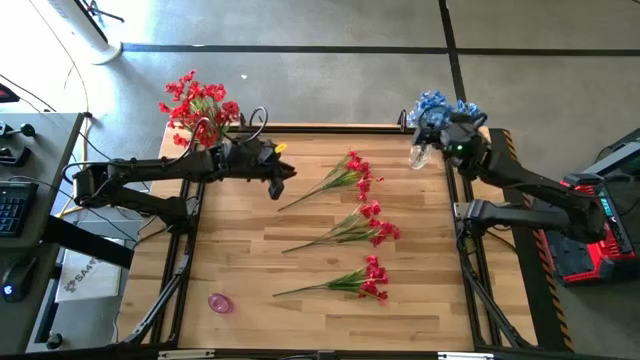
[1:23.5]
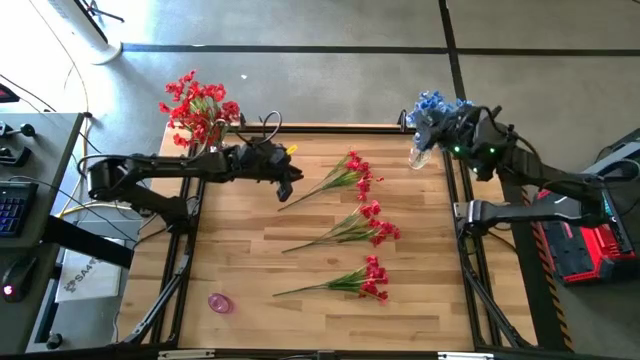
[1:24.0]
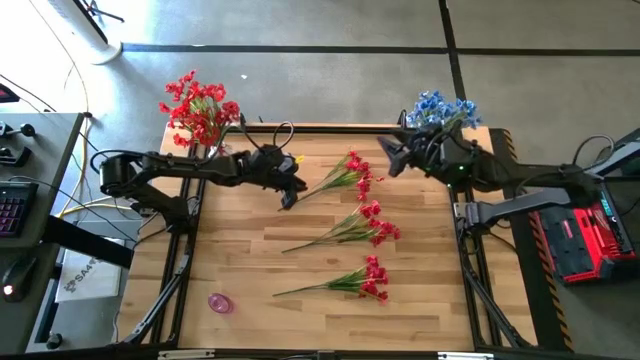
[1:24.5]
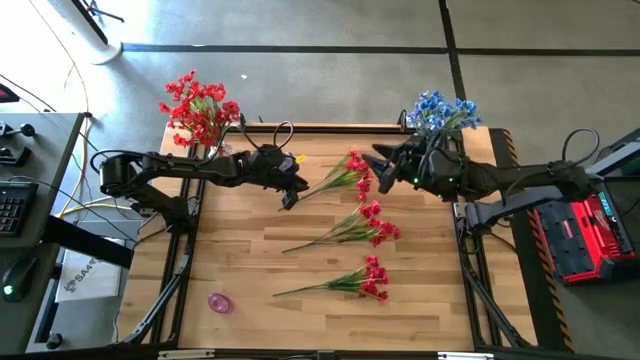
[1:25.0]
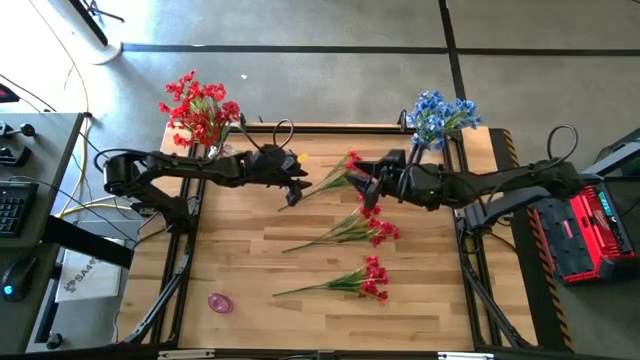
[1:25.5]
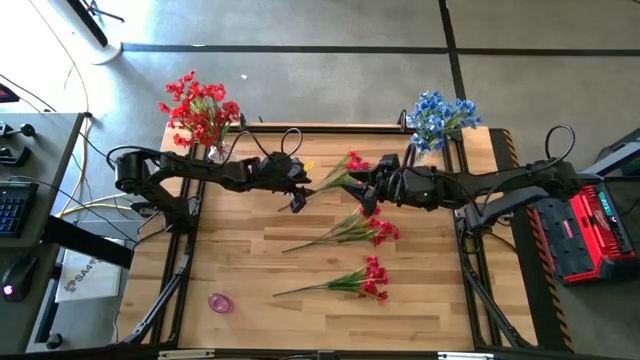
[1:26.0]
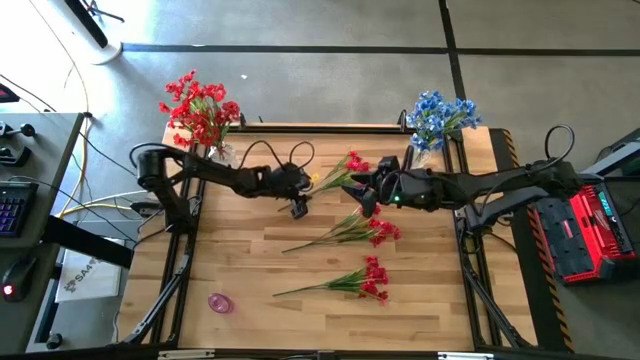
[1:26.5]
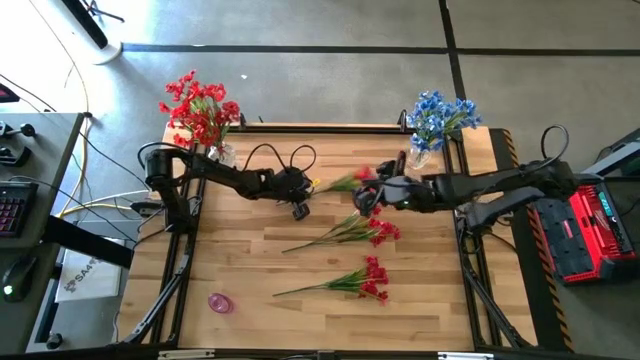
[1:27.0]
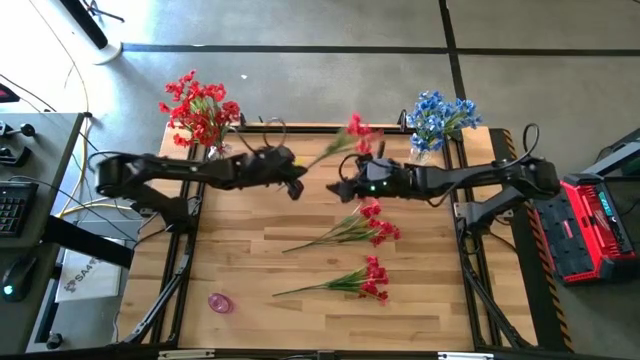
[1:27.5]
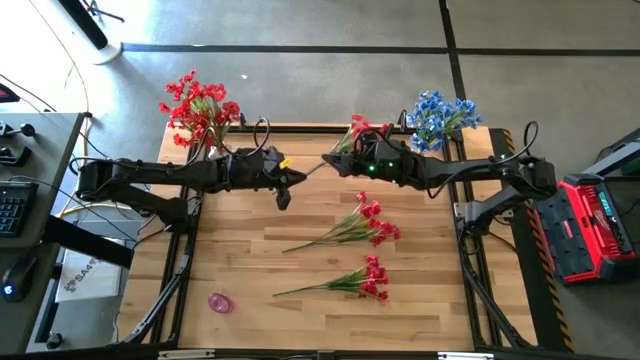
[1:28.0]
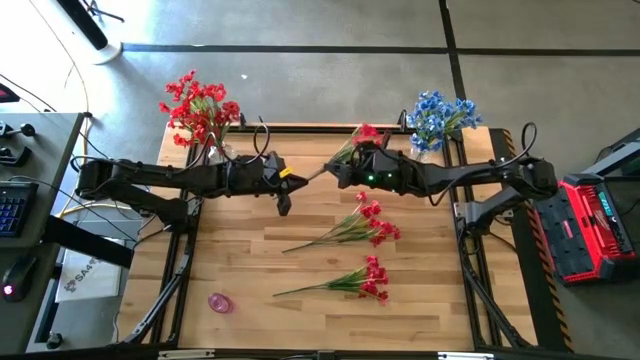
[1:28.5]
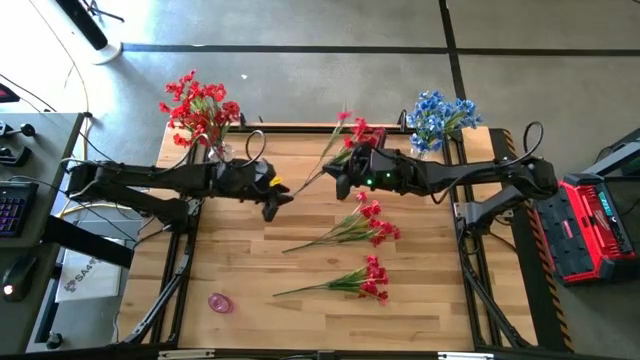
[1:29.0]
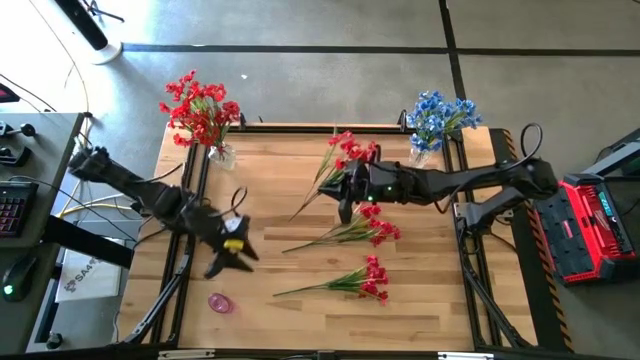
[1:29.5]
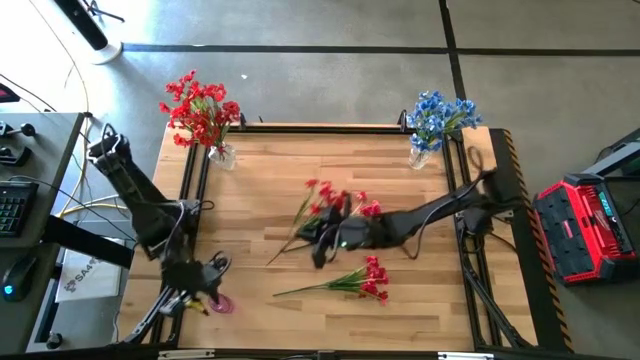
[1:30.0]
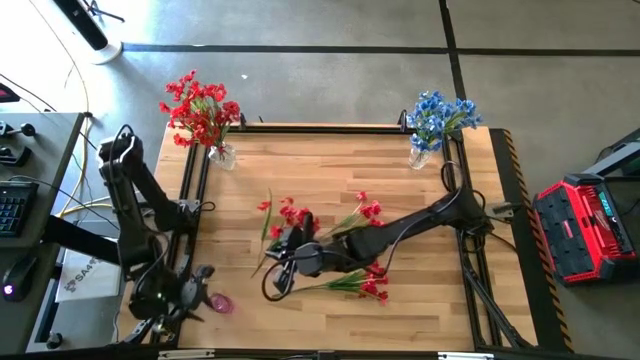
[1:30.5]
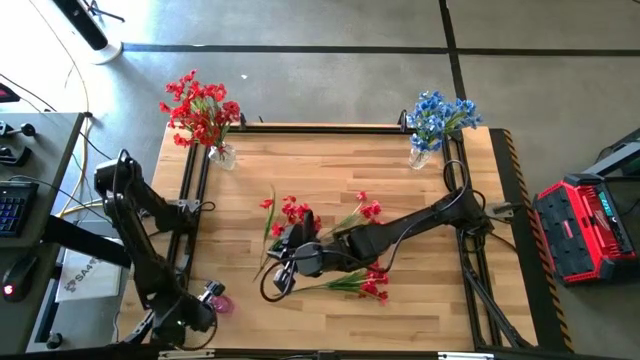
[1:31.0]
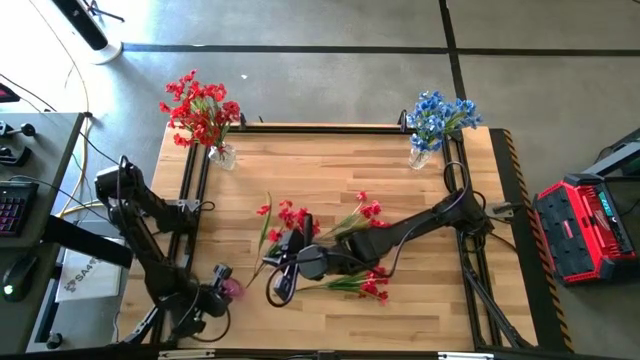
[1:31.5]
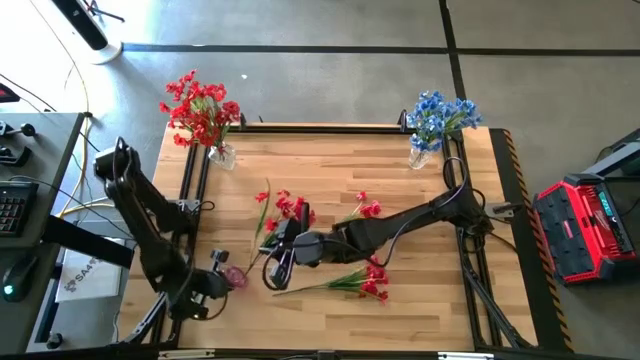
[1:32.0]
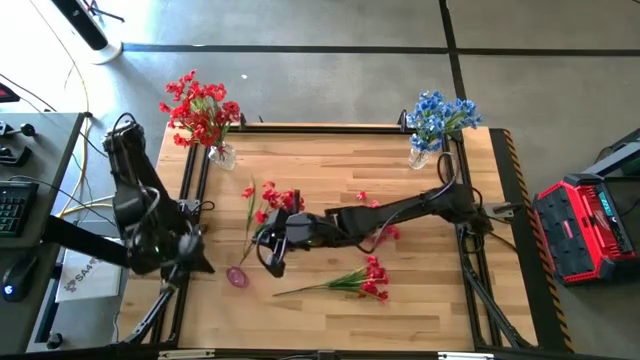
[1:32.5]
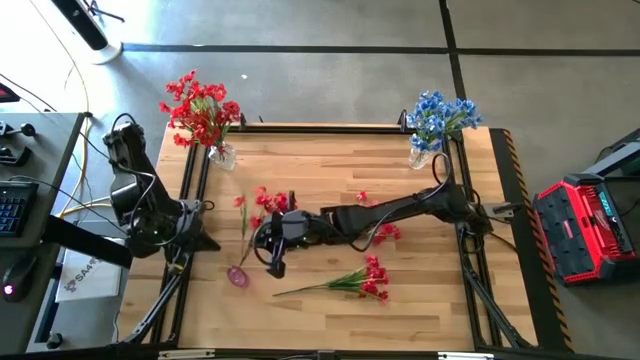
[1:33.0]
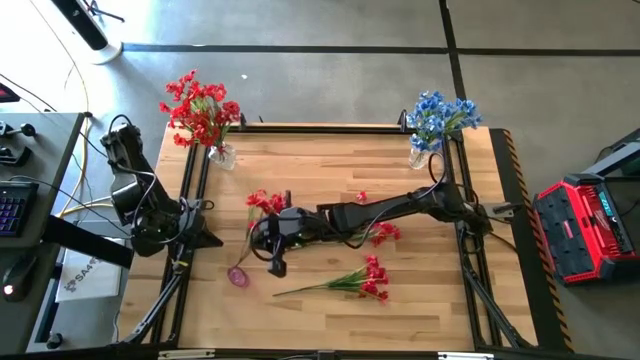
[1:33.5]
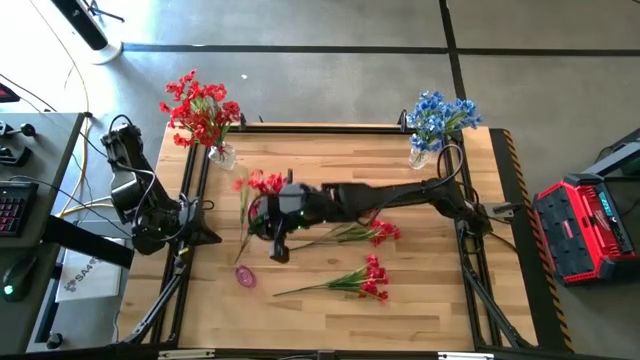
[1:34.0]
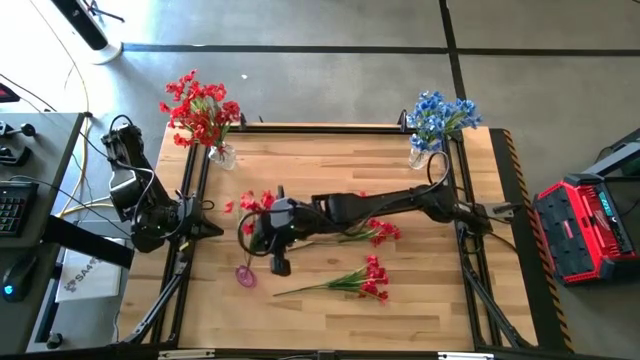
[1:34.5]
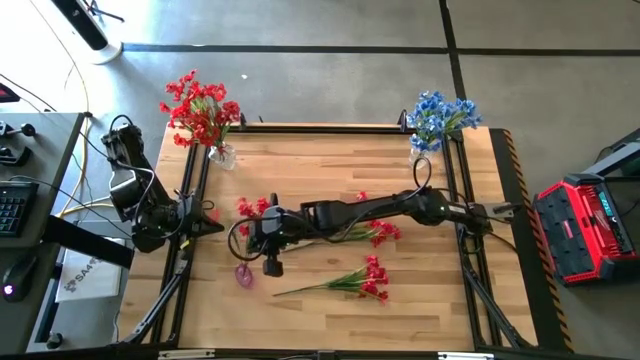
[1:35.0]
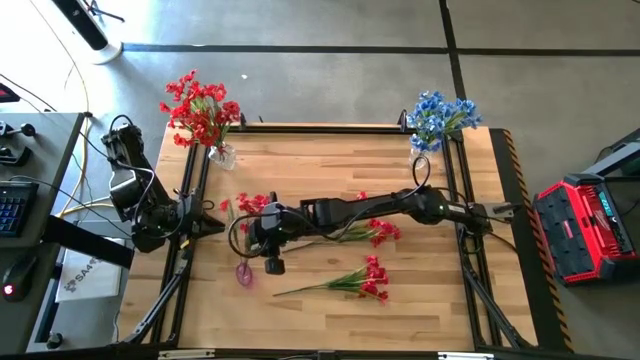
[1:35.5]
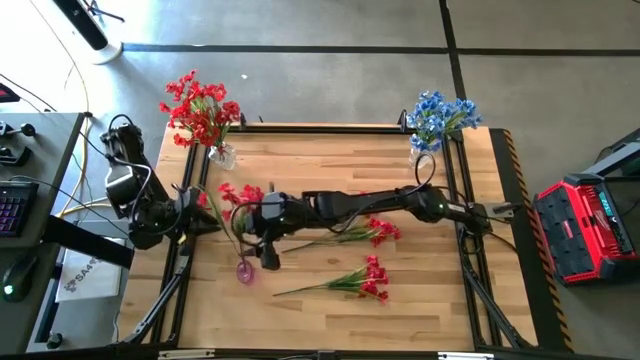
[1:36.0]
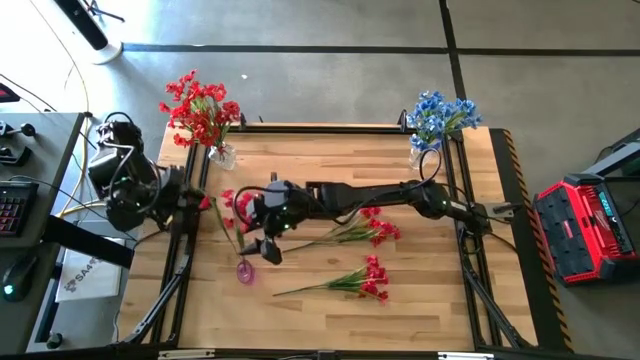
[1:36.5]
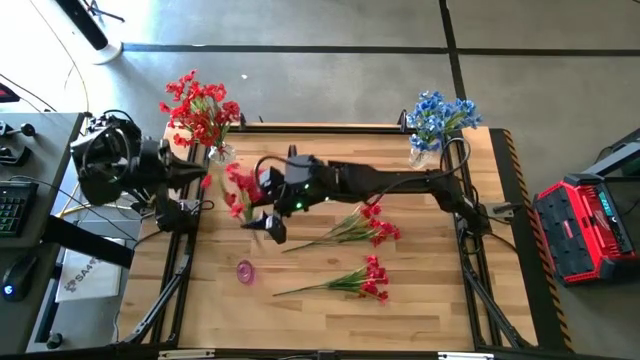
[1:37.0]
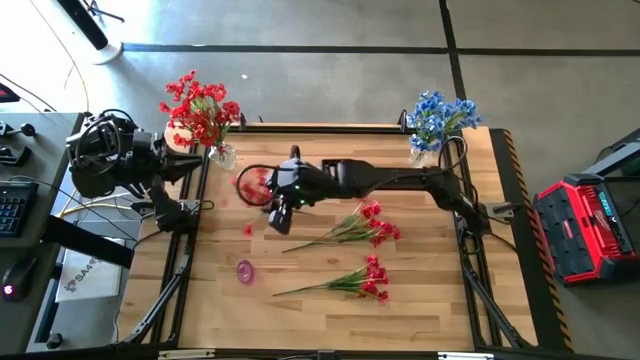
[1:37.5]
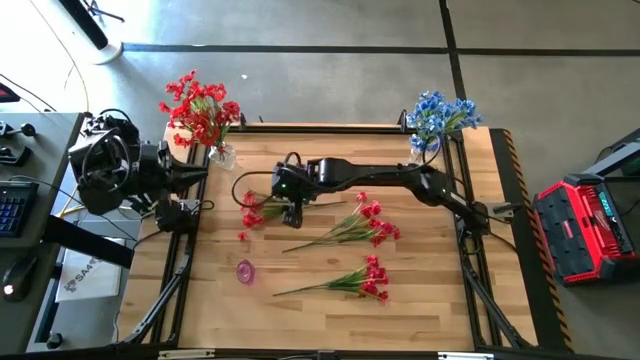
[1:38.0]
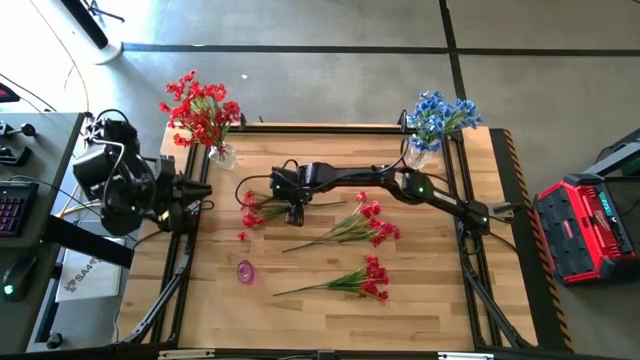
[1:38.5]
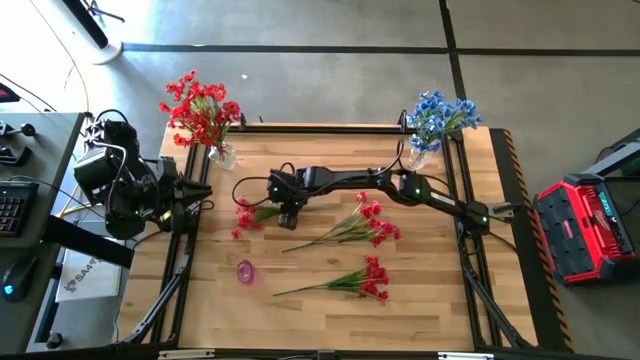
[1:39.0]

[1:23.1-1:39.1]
Task: Sort flowers into vase by color
Put the top red flower into the violet transparent vase

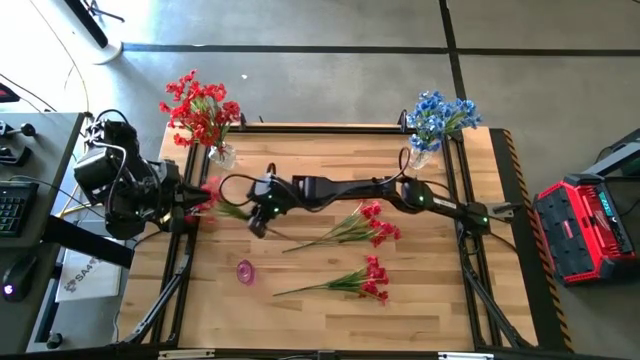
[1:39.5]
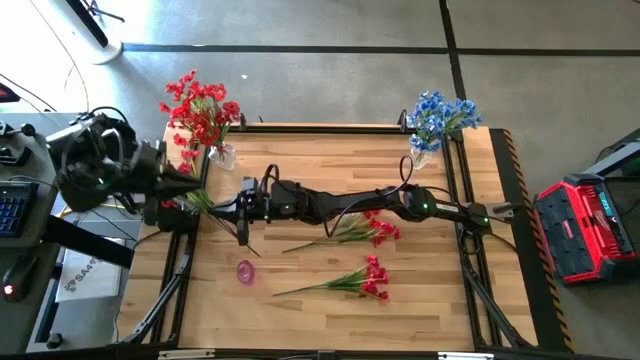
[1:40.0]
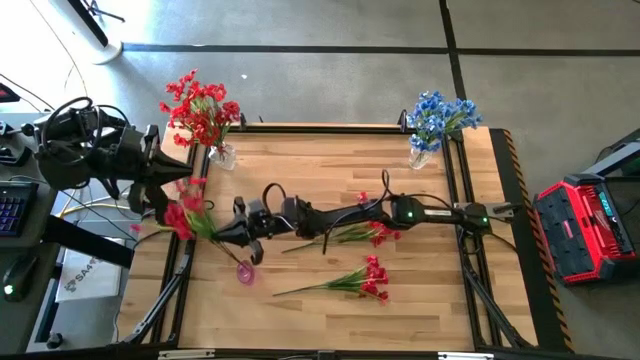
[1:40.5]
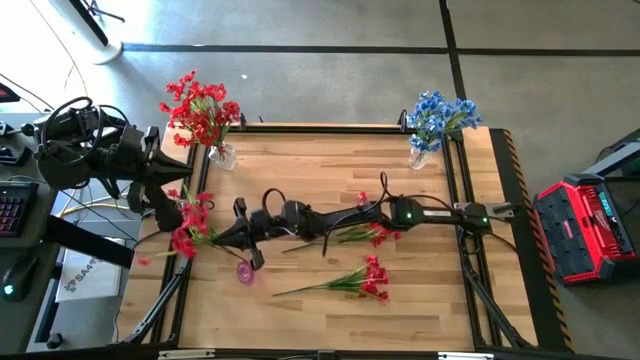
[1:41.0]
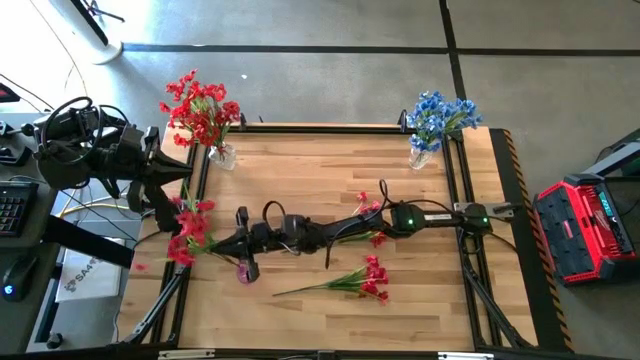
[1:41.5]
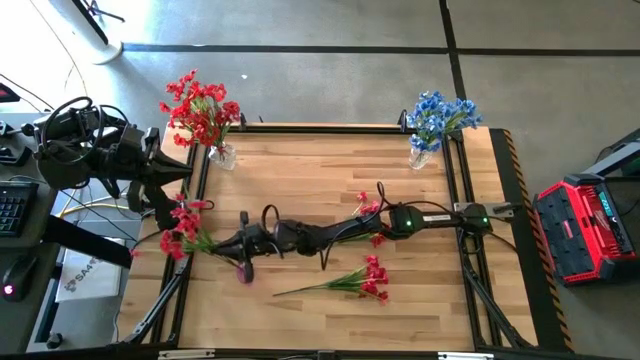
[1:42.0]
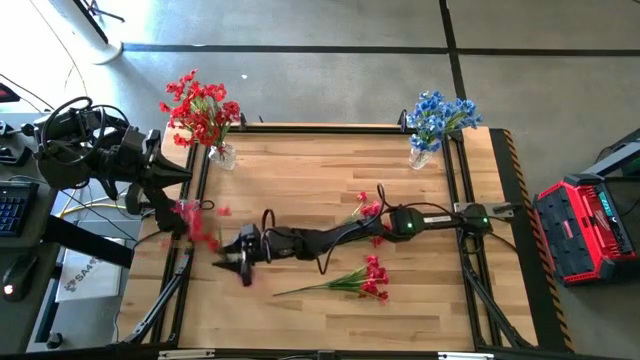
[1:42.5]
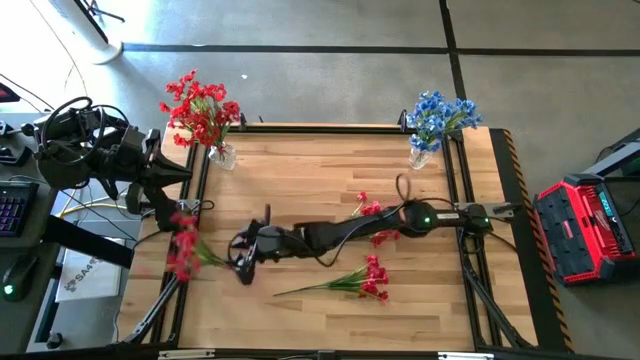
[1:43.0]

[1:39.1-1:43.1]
Put the top red flower into the violet transparent vase
